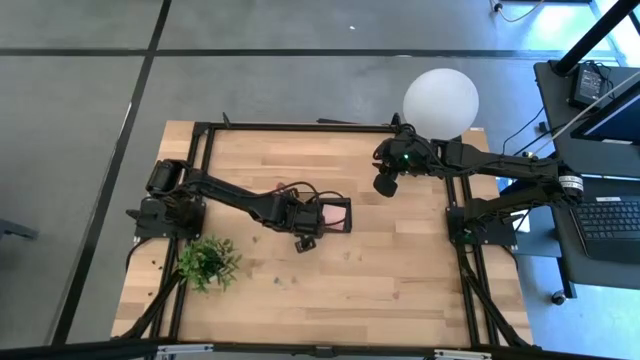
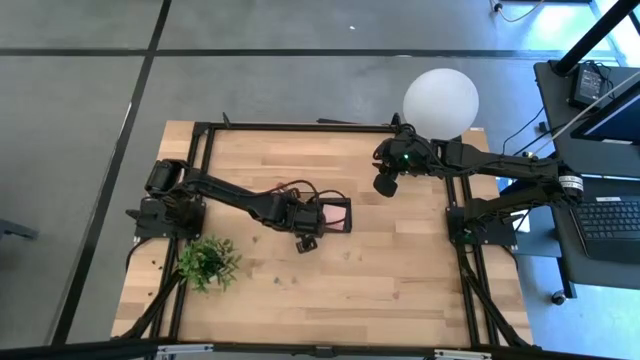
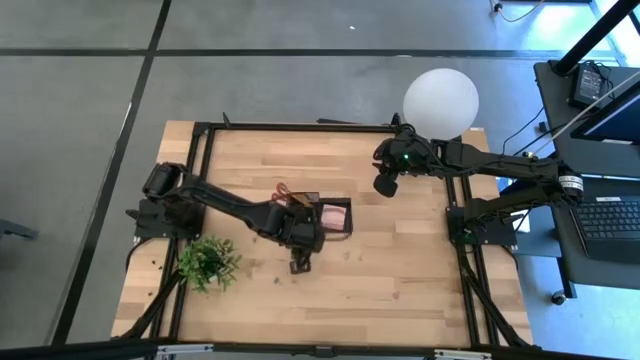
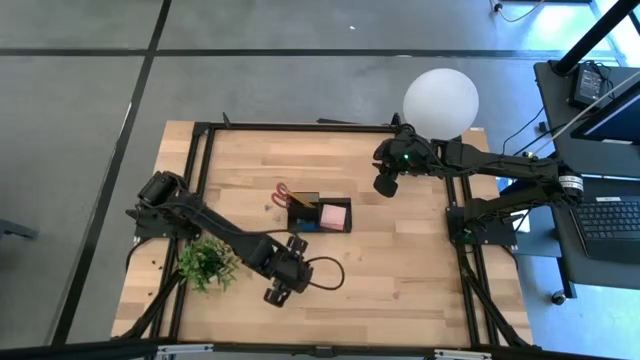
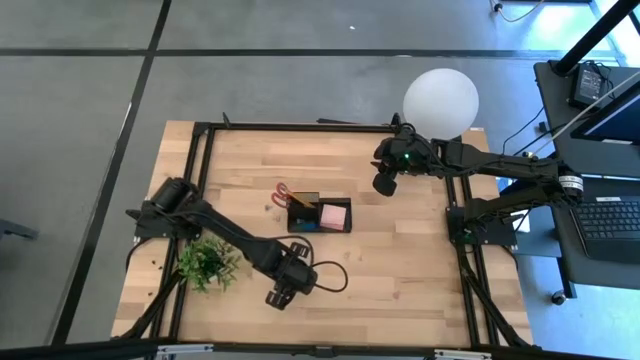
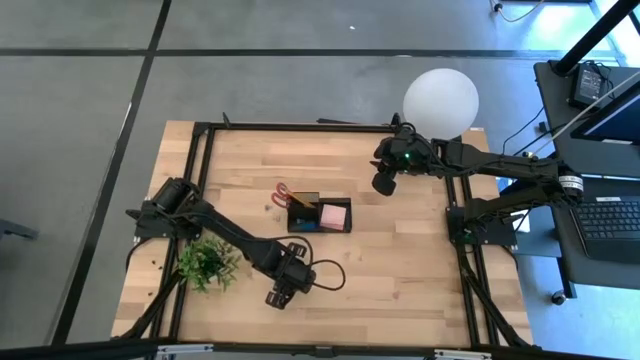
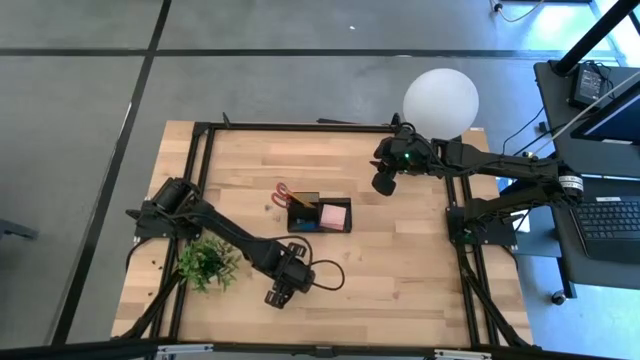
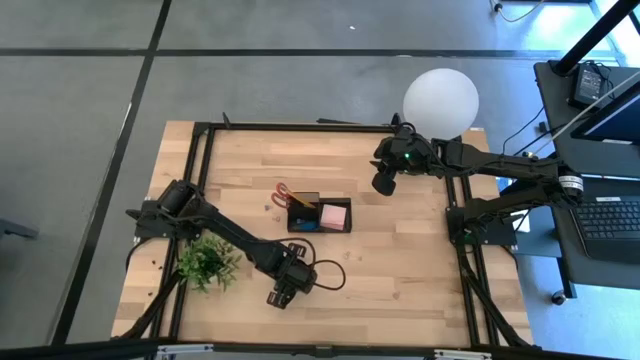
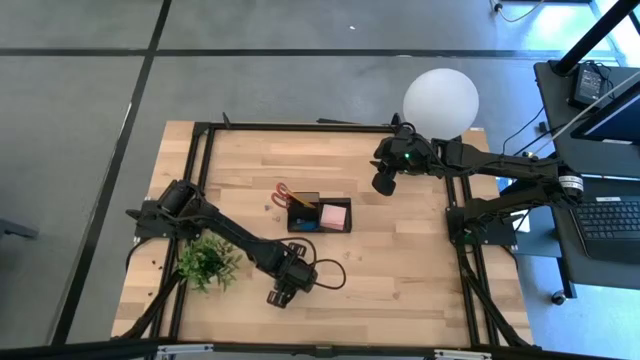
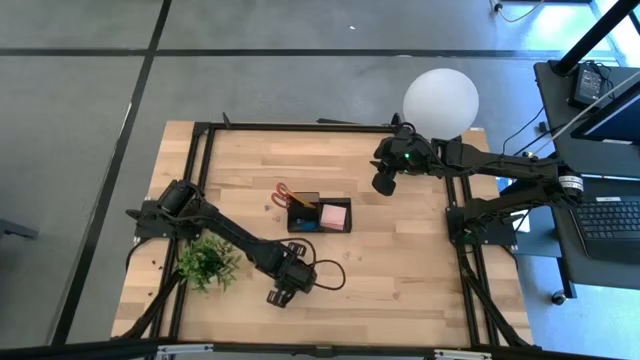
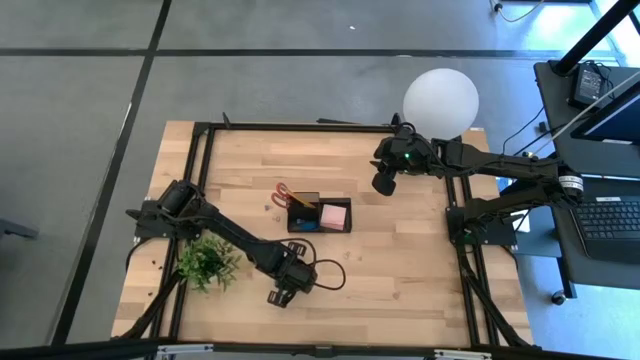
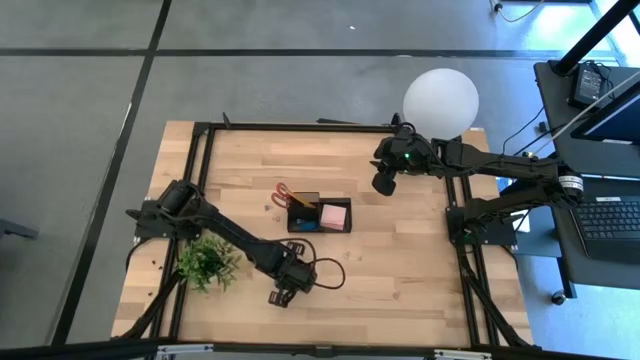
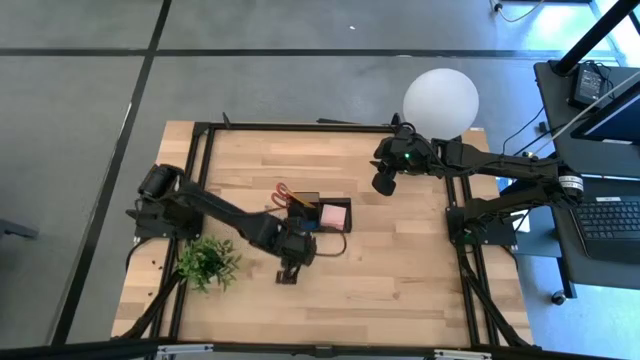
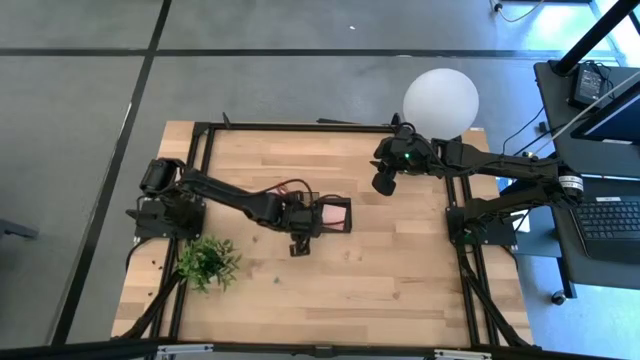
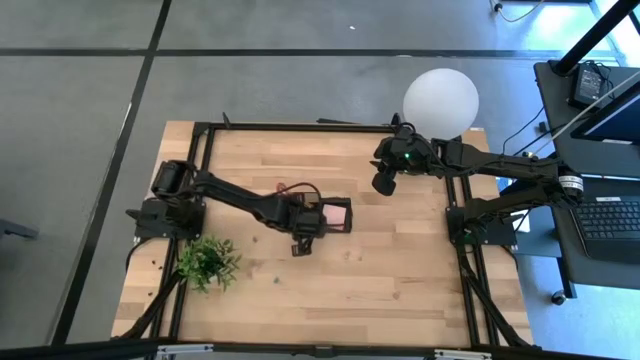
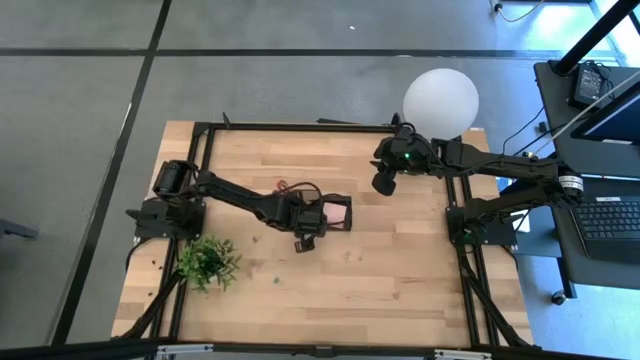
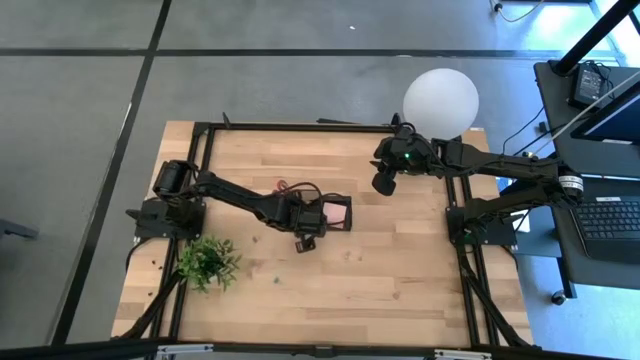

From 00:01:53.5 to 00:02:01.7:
Task: Pick and place office supplies into organizer
Put the pink binder clip into the black desk organizer

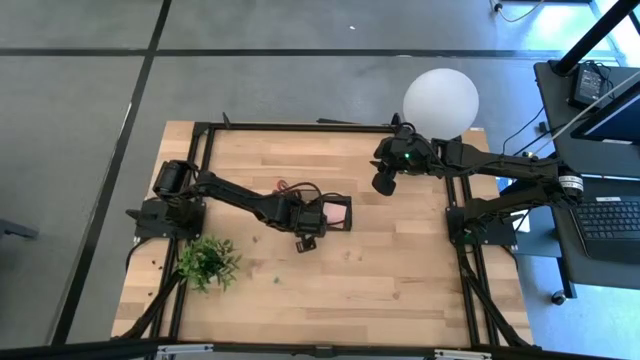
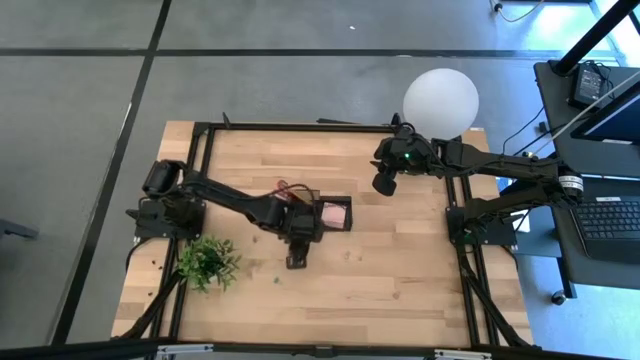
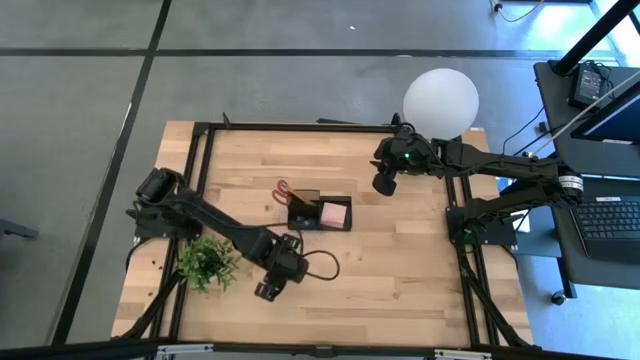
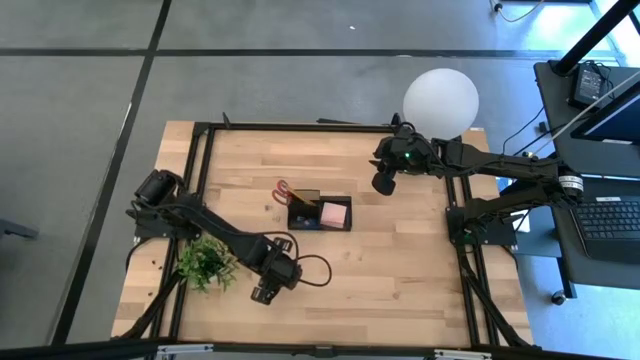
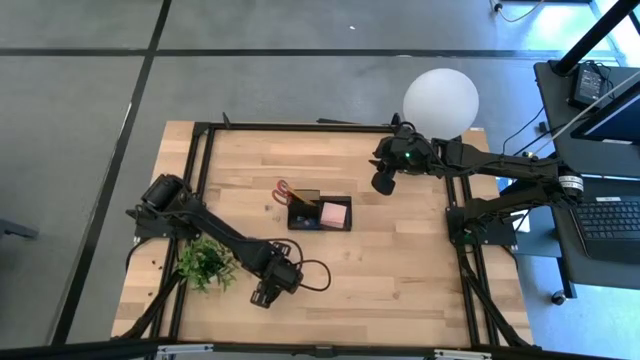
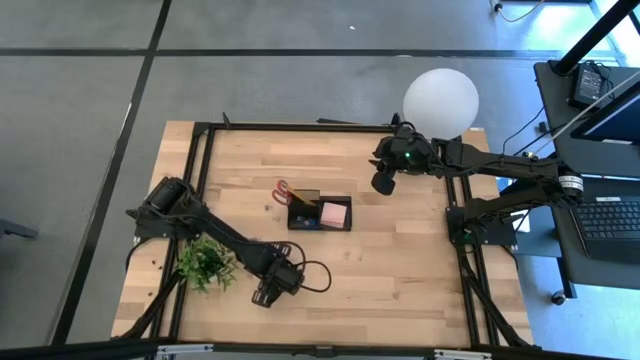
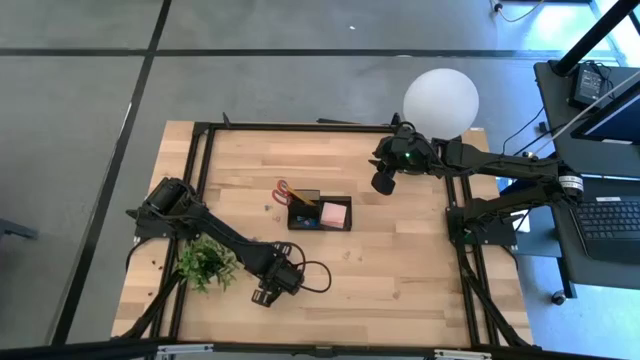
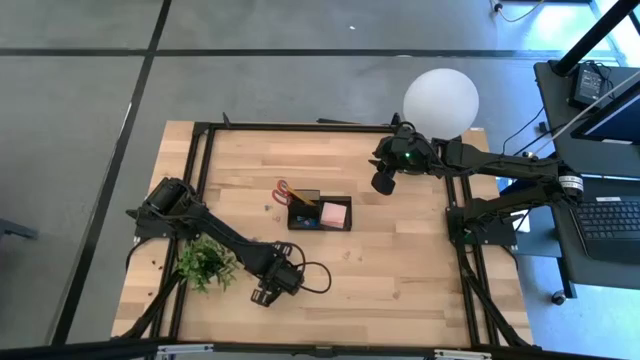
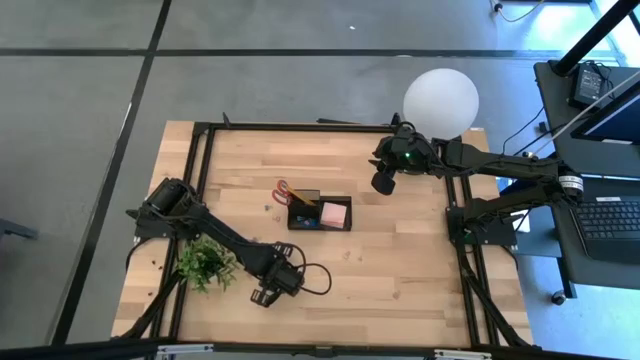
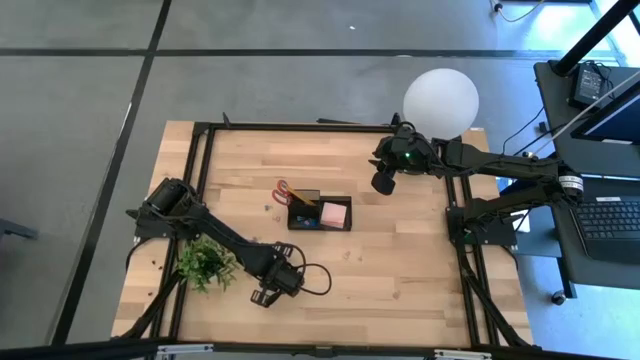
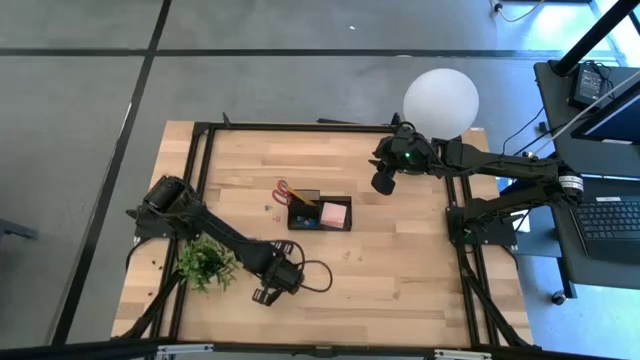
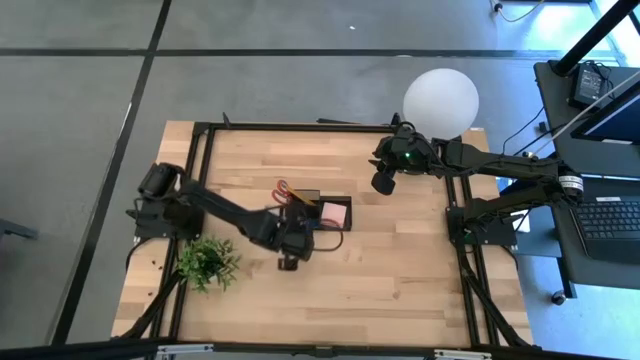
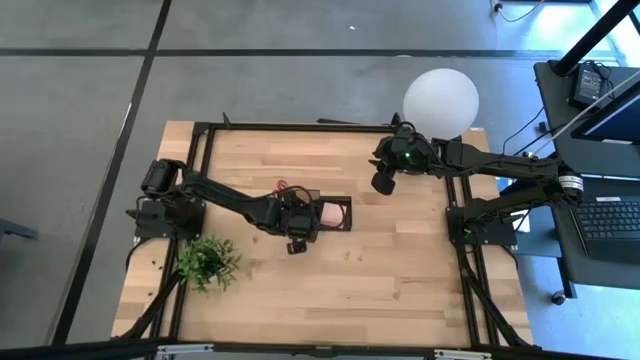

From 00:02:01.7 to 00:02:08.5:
Put the light blue binder clip into the black desk organizer

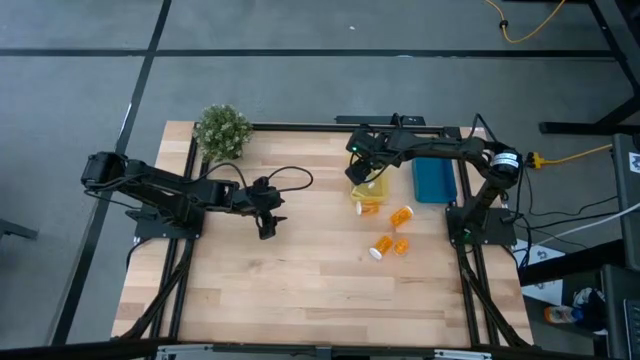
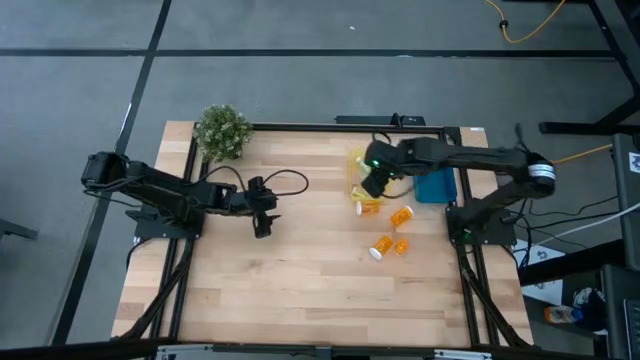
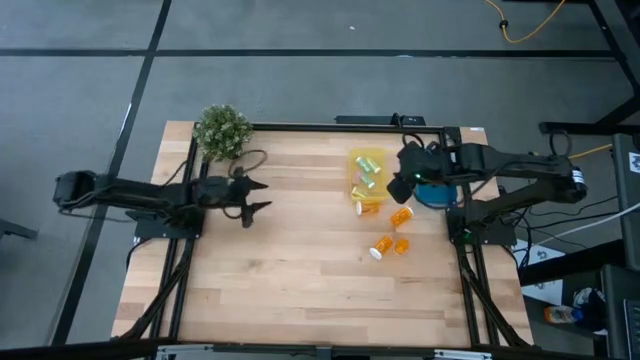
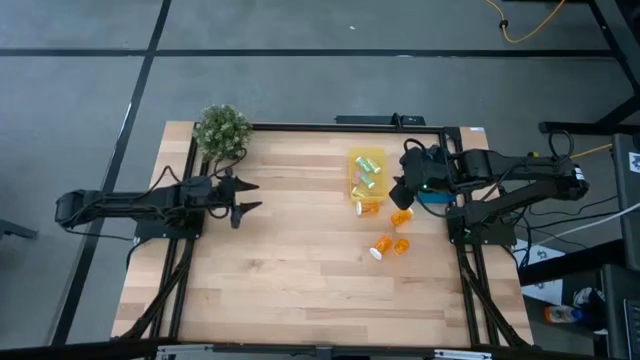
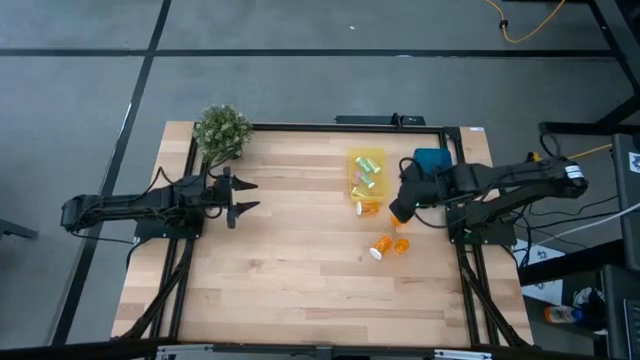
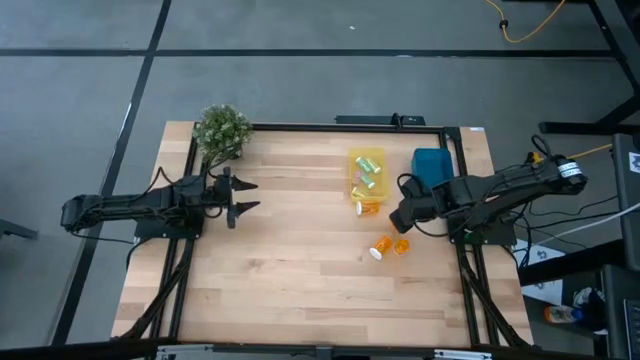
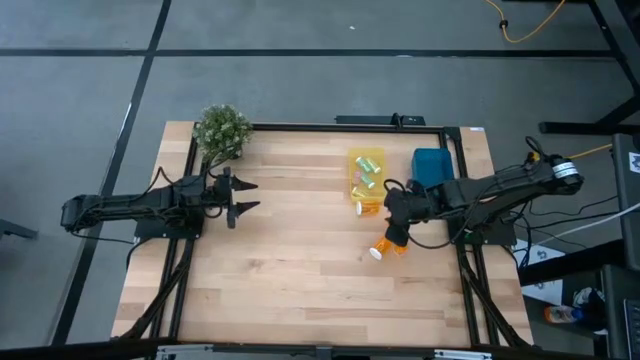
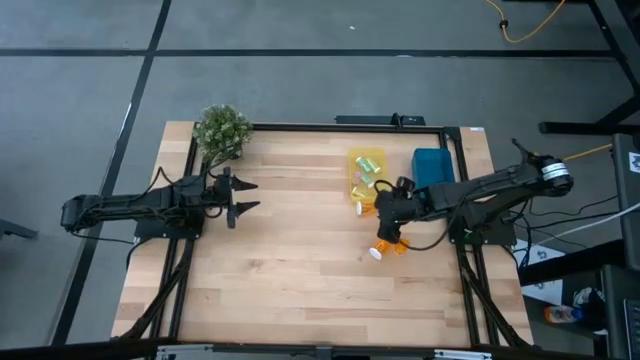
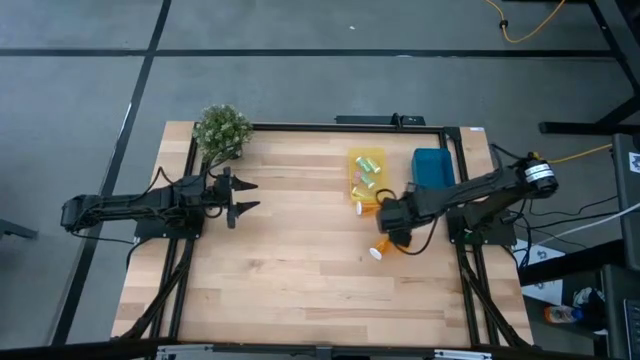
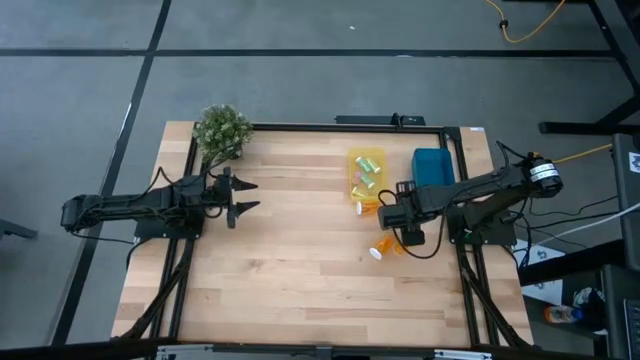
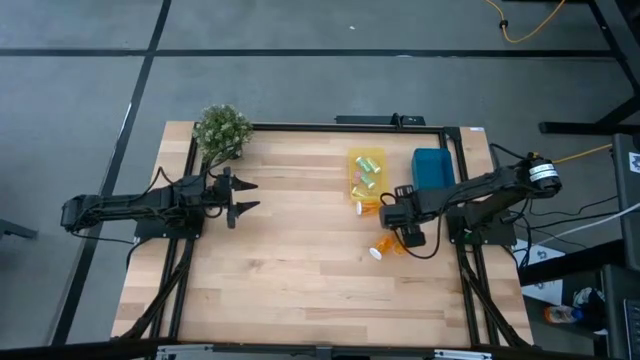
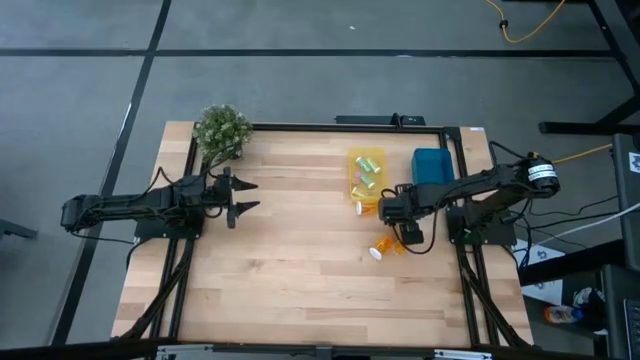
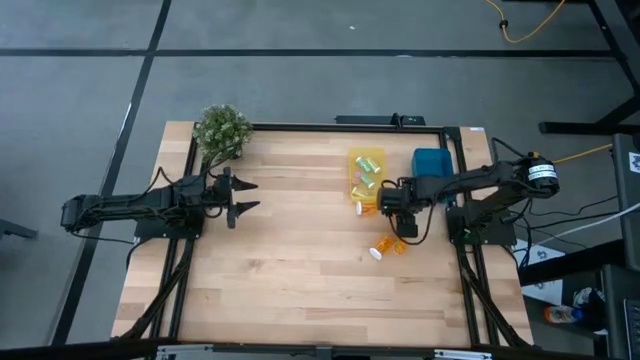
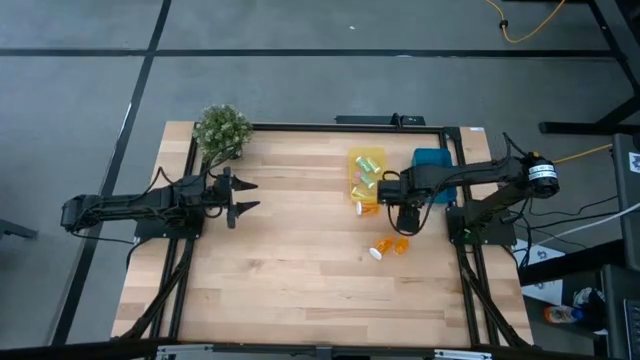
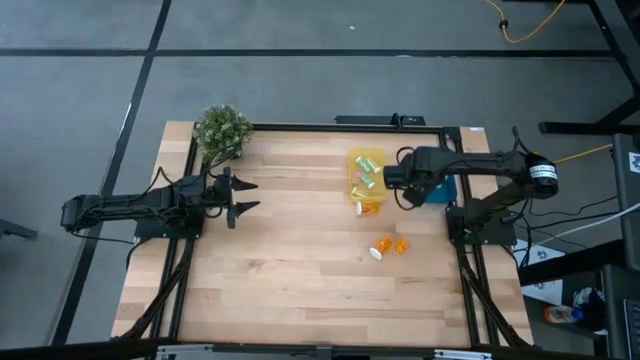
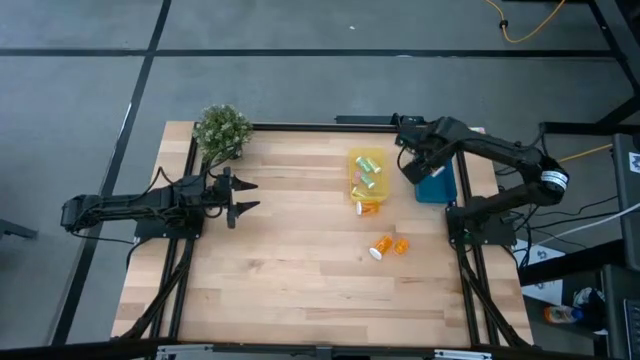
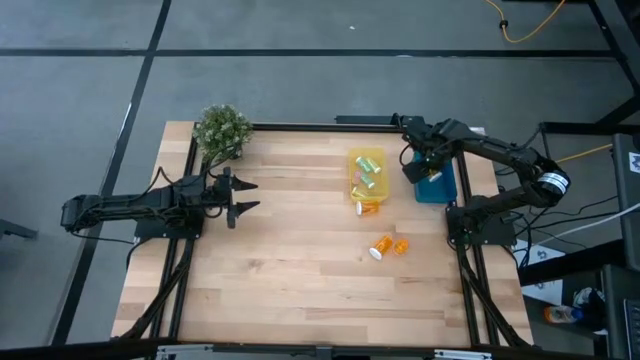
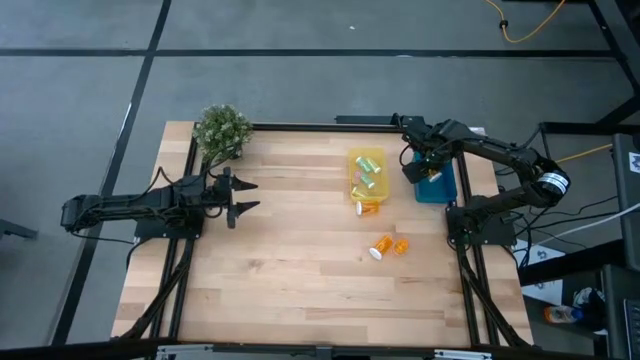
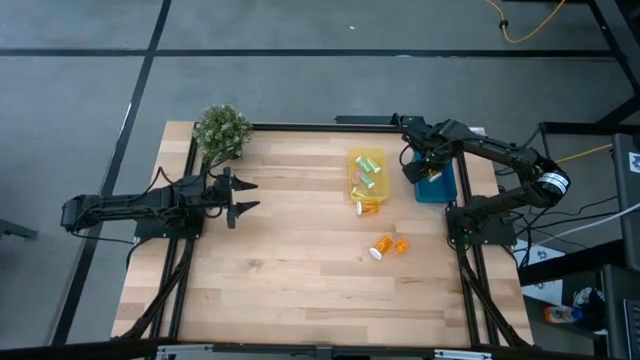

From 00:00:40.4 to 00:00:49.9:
Task: Pick and place medicine bottles into bin by pill shape (circle, oval)
Put the large orange pill bottle into the blue bin
